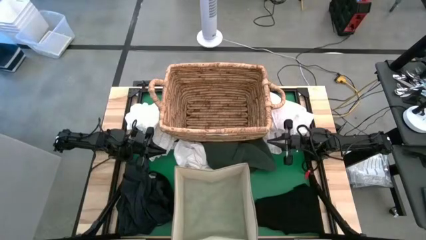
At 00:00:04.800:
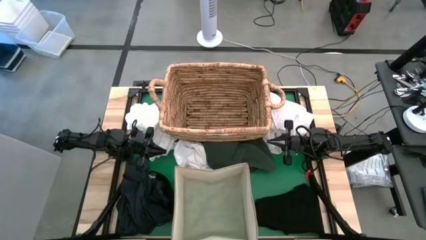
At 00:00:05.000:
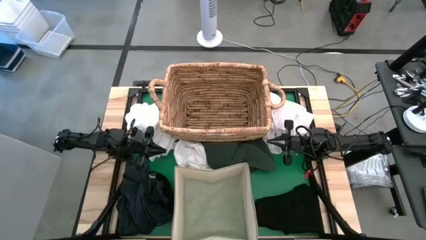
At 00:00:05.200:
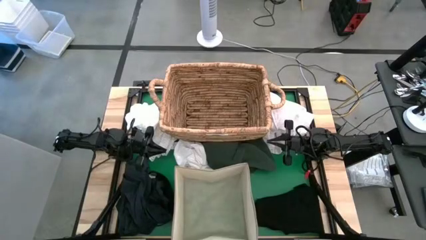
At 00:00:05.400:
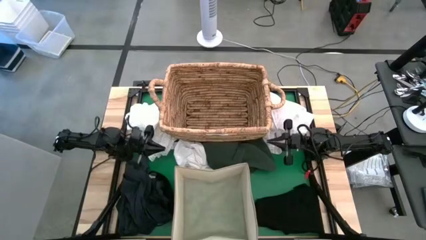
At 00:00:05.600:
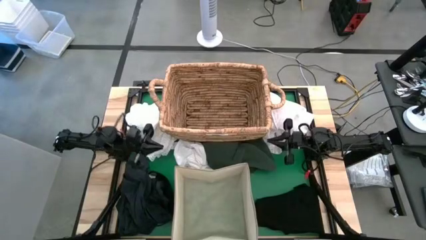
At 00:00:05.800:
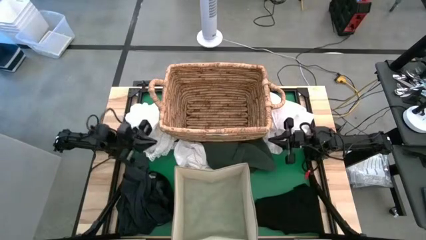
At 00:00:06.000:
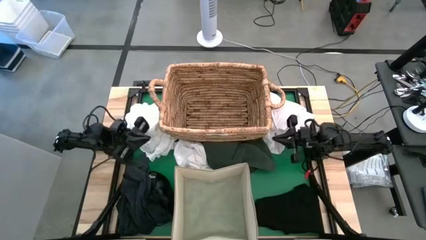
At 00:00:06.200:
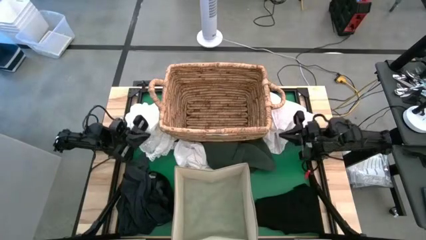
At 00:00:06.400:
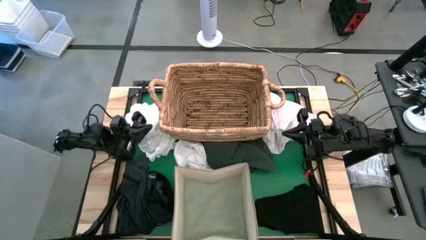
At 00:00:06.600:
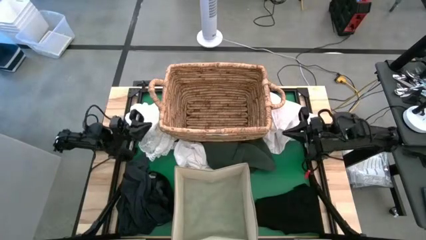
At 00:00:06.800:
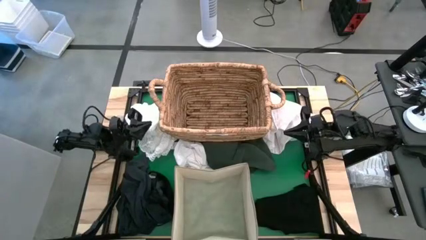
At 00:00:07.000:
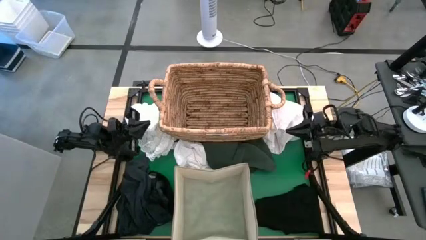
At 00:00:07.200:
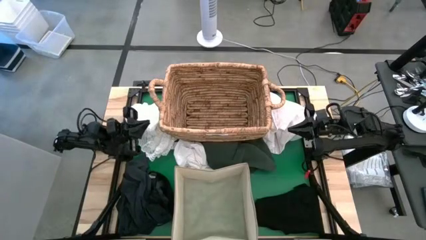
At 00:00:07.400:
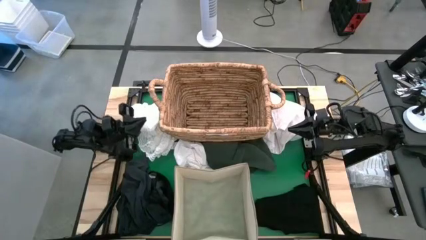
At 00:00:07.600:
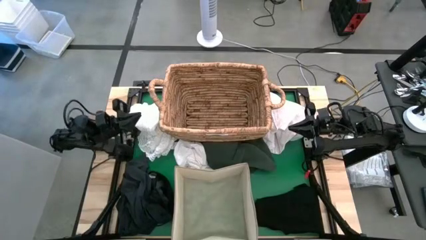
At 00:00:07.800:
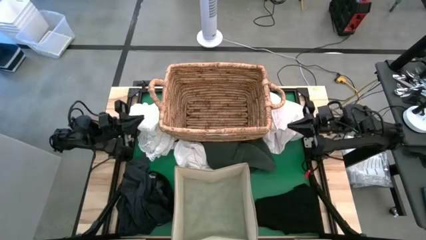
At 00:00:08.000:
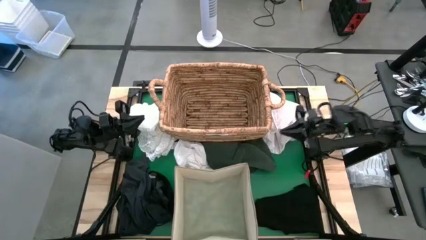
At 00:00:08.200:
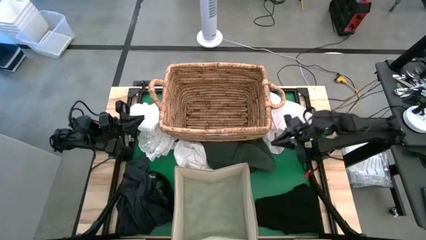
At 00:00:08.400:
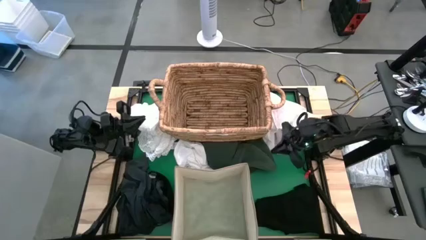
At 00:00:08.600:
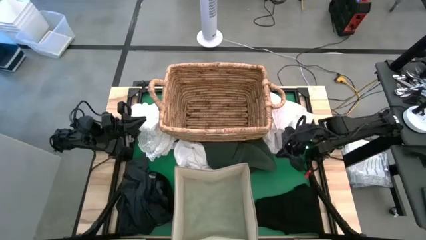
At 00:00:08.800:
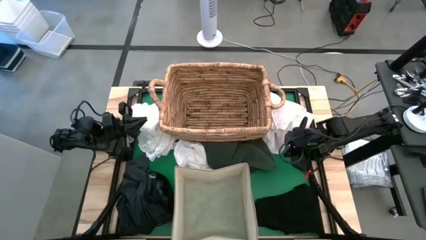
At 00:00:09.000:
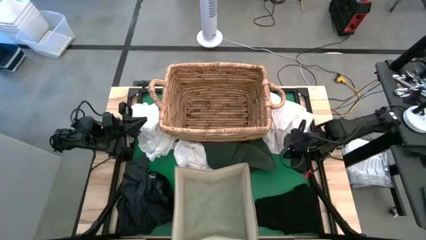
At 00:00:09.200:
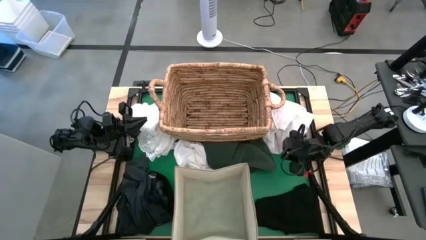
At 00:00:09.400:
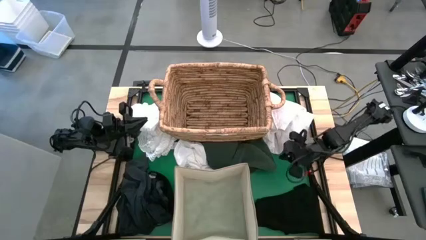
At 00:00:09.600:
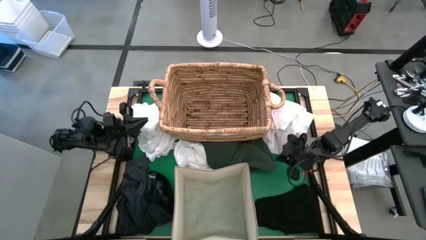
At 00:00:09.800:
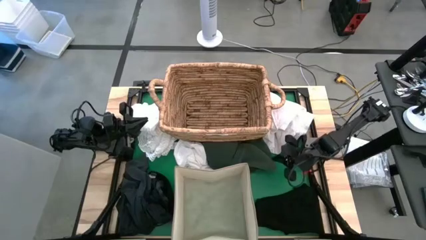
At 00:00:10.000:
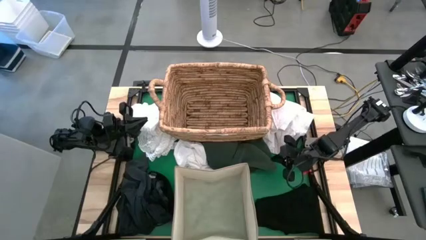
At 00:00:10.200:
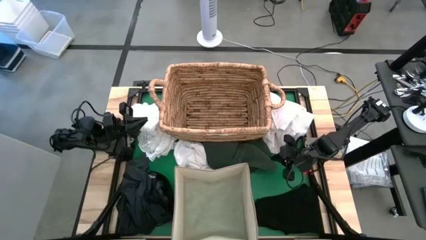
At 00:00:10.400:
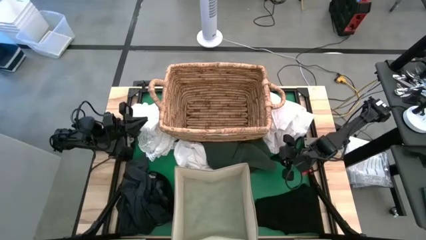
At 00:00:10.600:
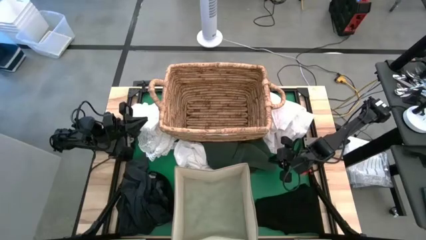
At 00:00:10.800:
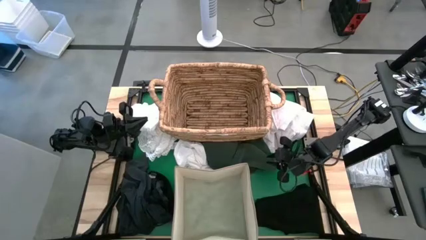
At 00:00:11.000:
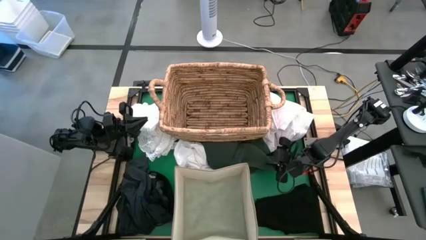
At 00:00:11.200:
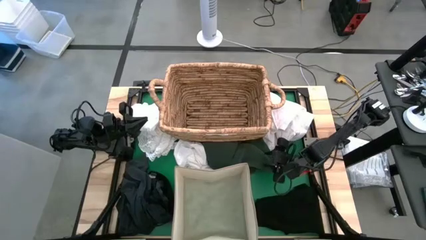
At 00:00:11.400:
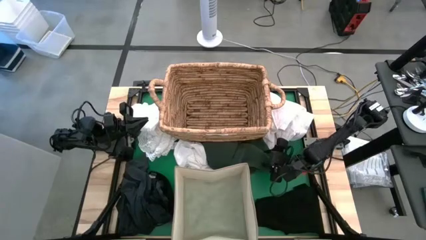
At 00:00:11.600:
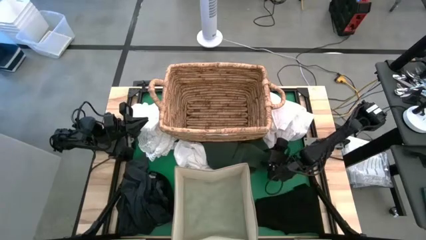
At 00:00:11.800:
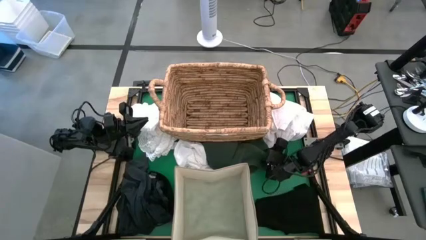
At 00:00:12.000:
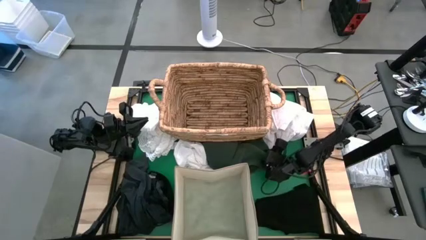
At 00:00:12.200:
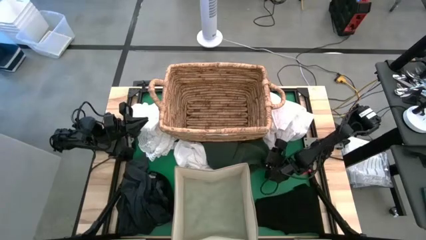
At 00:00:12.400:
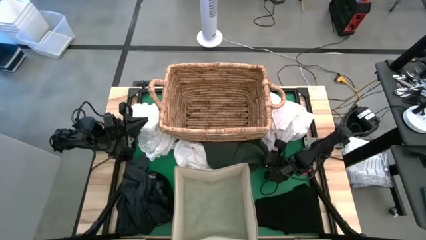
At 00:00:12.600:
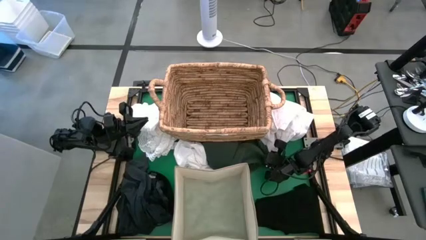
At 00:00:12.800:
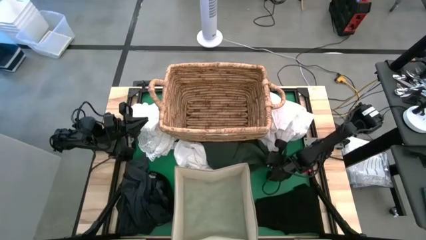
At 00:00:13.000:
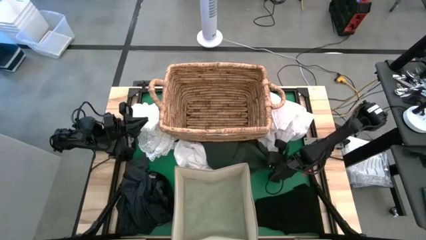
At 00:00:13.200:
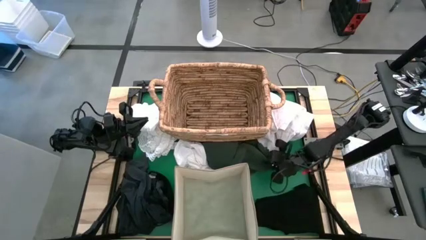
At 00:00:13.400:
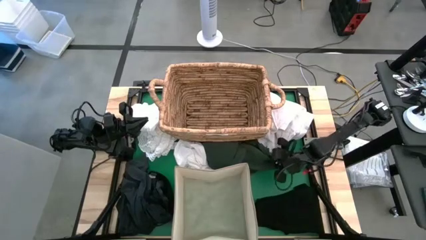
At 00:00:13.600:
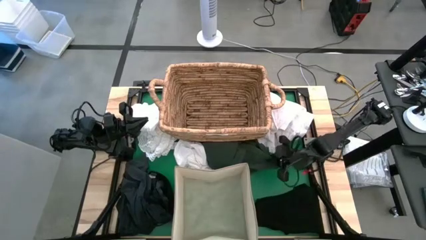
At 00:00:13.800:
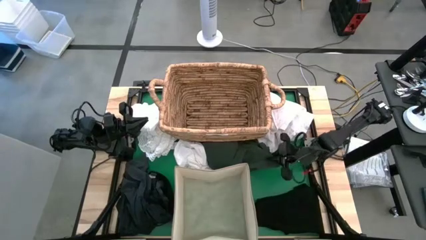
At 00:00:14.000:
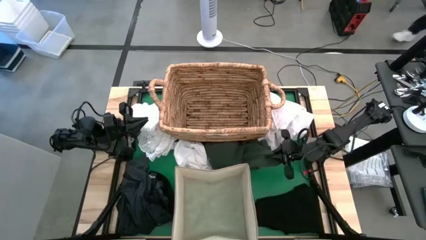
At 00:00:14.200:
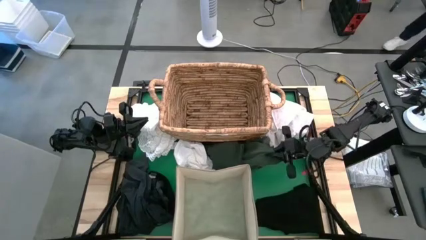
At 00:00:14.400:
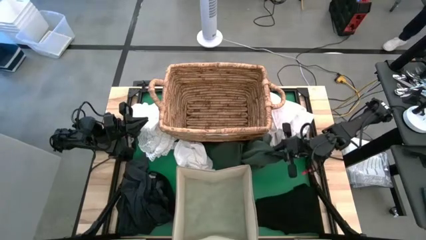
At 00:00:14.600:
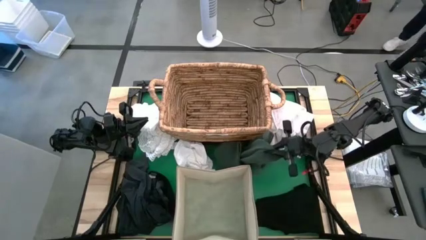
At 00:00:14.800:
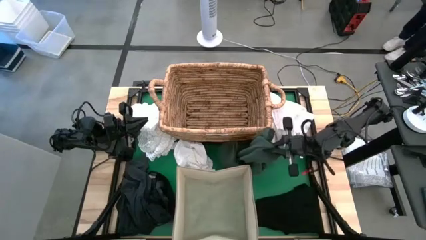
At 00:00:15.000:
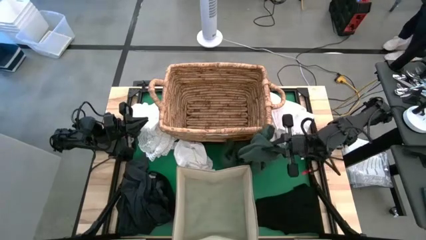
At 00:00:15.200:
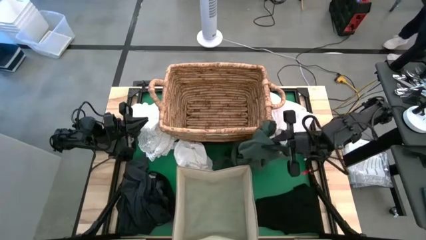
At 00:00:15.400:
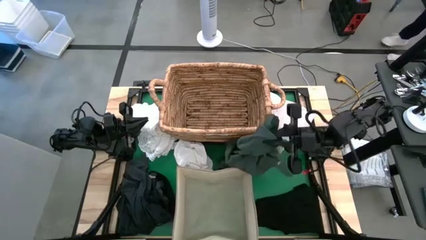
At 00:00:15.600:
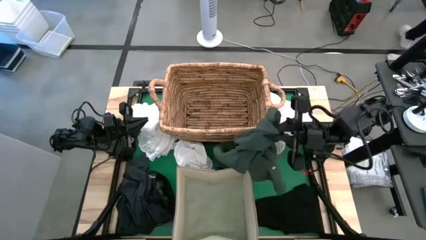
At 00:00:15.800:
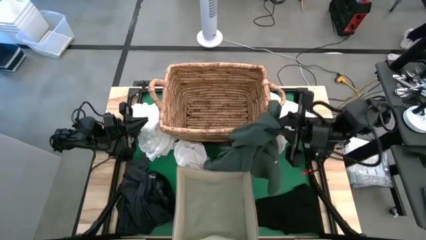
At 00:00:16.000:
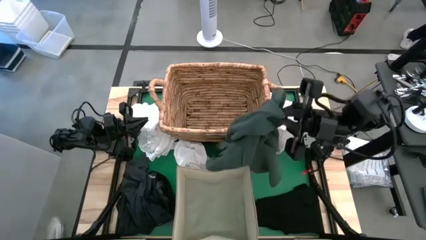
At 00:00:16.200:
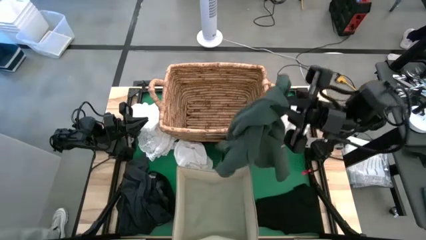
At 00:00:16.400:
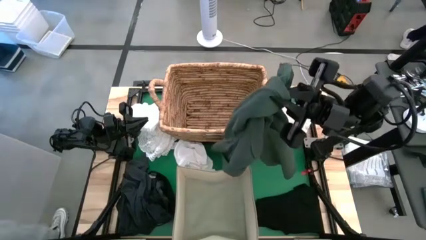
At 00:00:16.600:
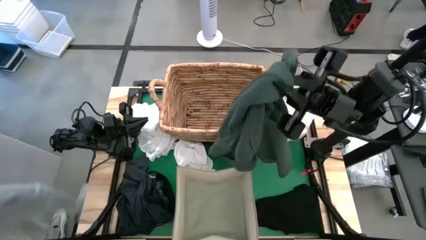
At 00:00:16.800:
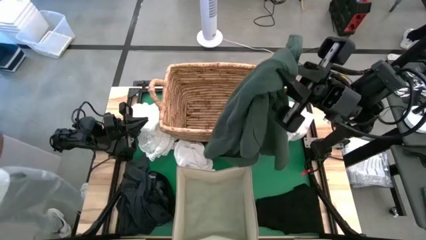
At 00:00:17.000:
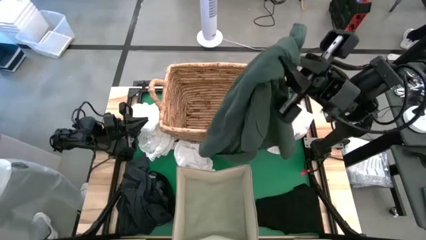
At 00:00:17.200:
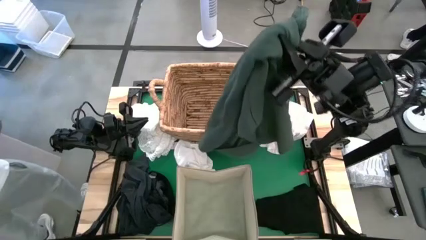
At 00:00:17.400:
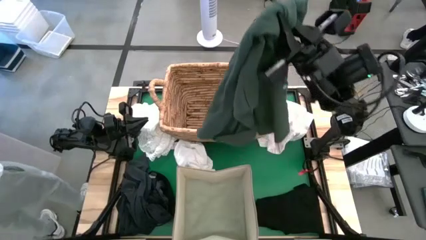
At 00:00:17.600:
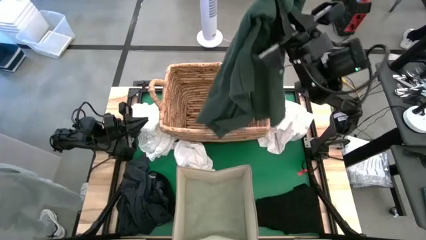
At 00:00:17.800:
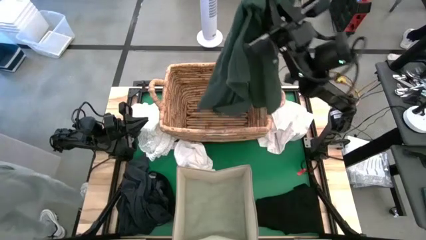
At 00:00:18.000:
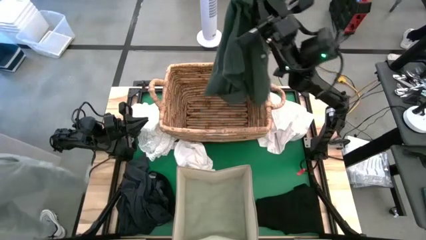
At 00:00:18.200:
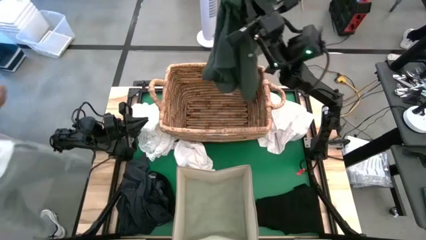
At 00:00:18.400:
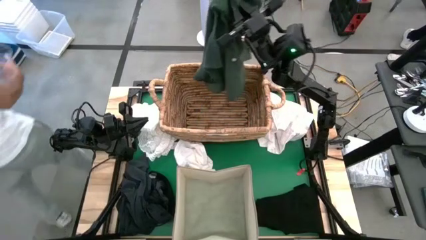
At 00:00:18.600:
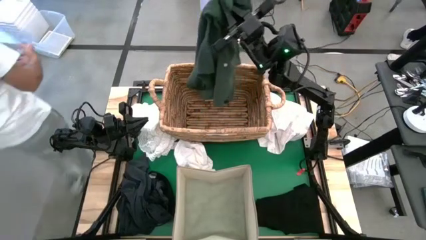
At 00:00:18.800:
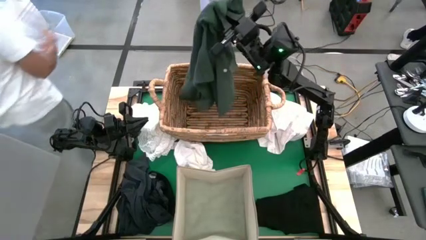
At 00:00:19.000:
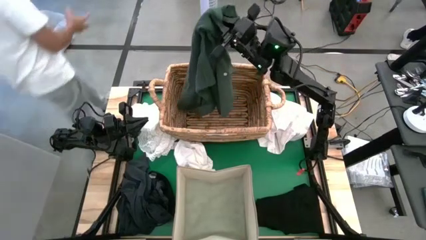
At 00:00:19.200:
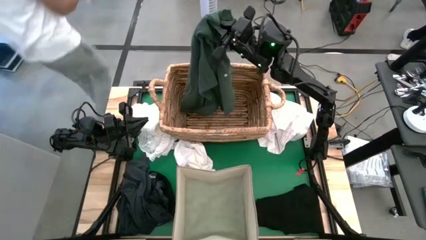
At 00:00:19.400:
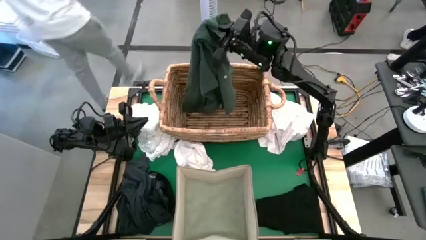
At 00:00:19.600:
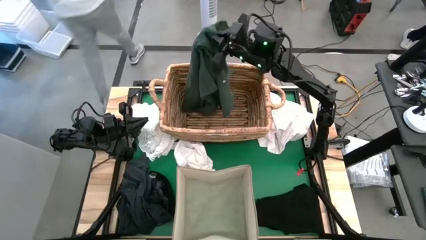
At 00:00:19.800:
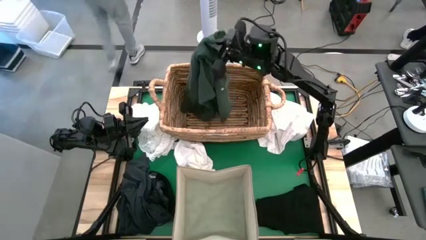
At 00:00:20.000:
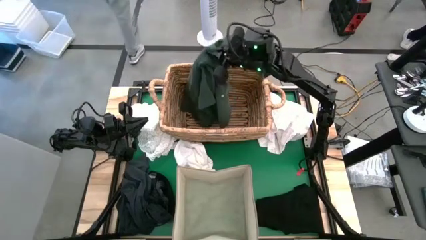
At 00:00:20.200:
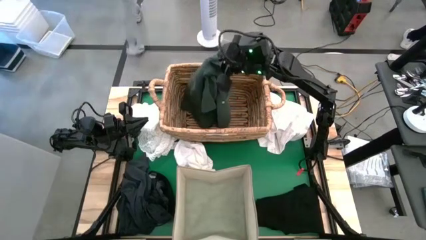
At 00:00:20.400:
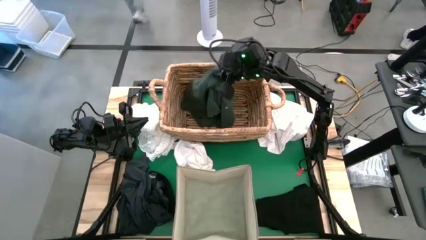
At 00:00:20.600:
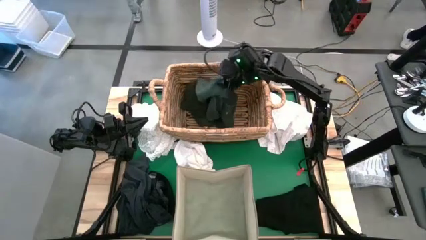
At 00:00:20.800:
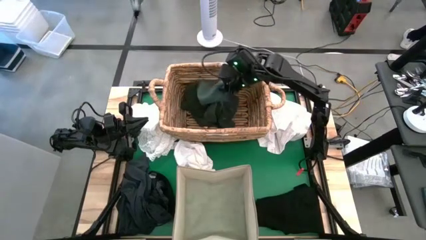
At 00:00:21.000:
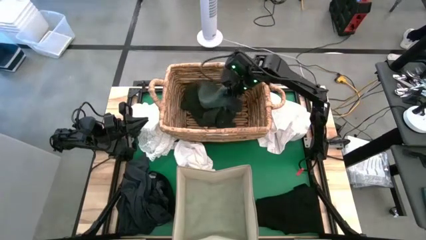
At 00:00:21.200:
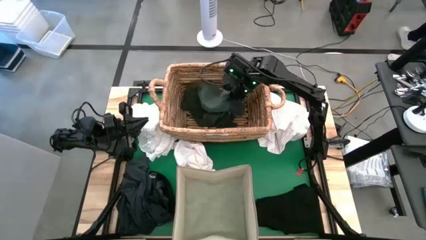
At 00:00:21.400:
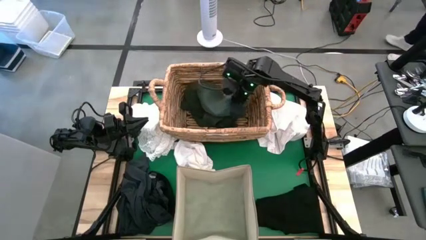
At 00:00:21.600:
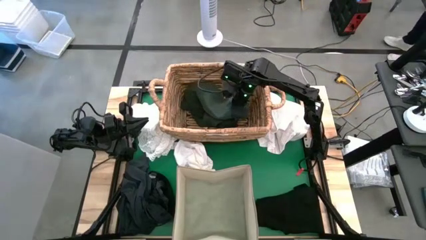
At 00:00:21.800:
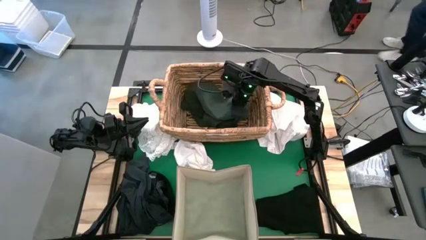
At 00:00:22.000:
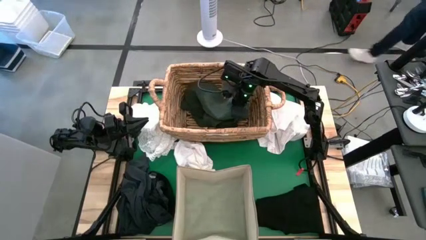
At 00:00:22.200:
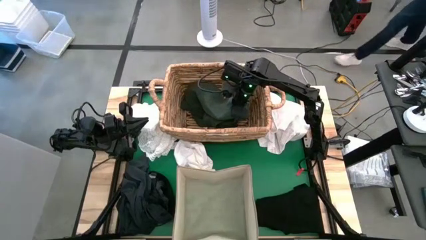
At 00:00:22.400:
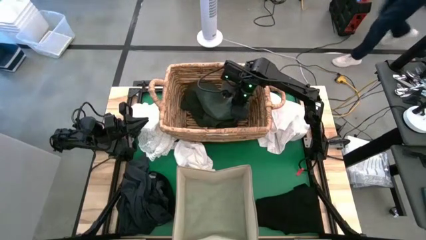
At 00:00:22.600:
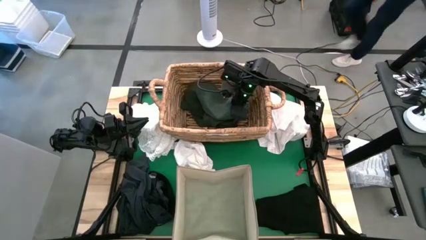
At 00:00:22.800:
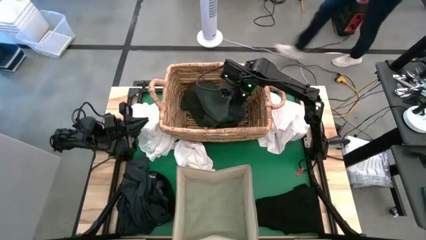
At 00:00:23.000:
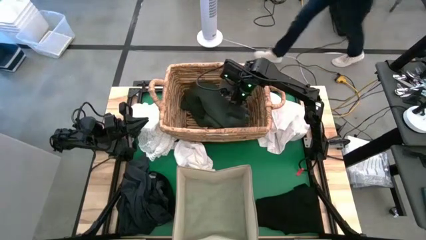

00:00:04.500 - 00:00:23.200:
Put the green shirt into the brown basket
